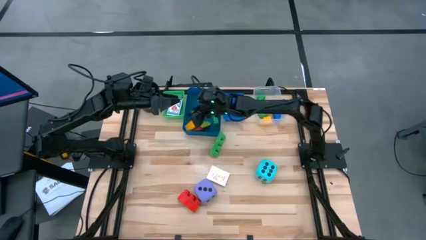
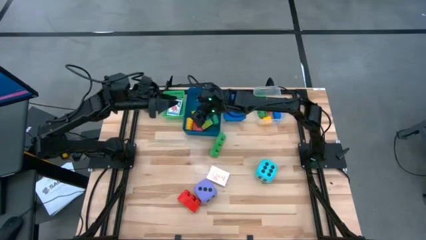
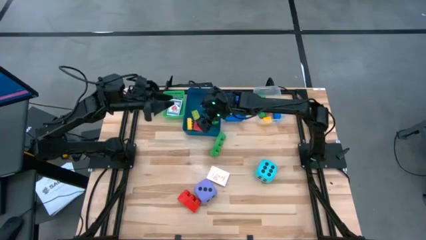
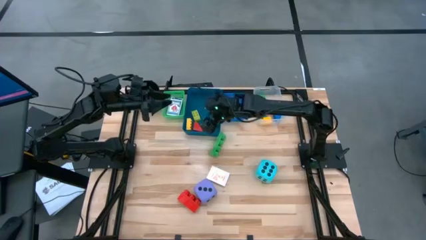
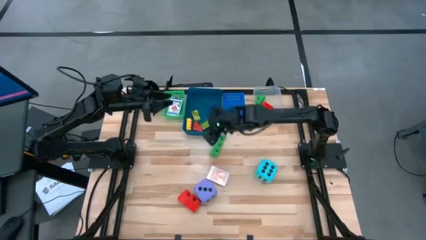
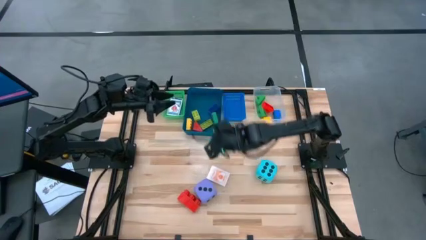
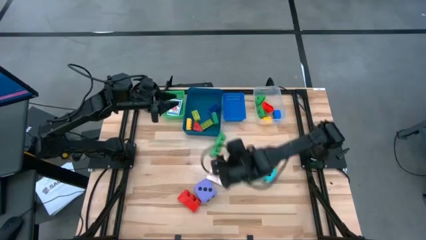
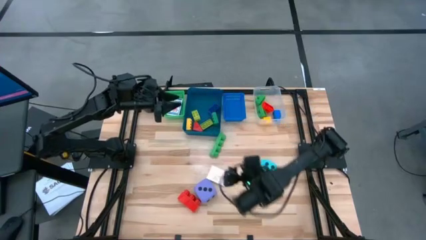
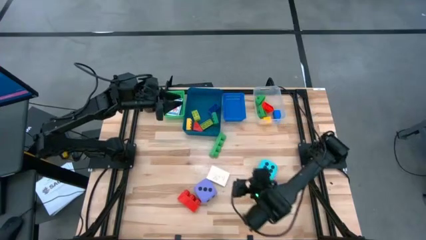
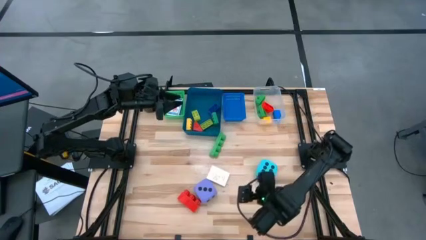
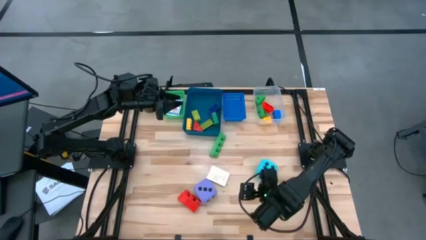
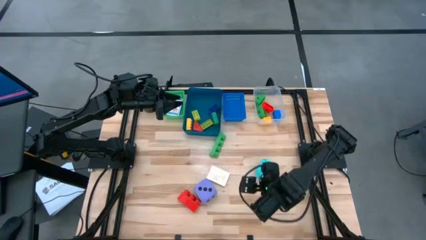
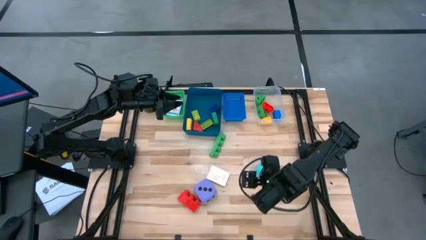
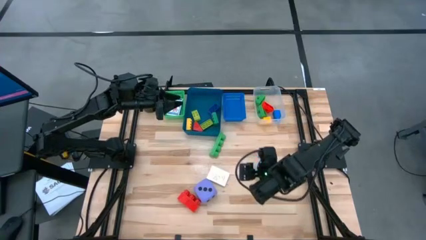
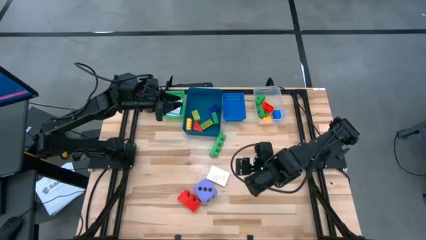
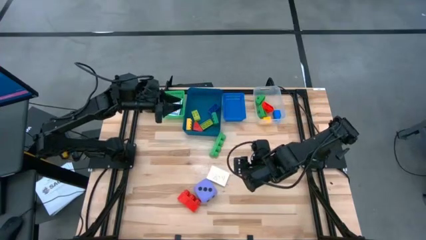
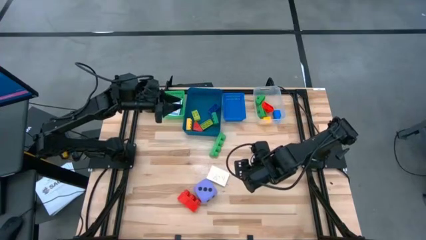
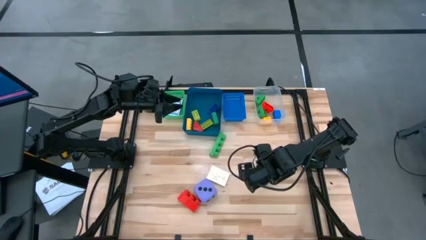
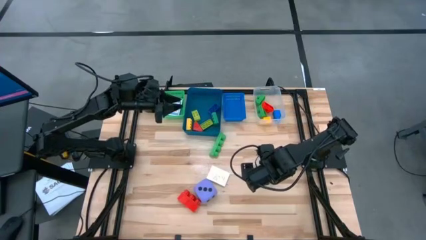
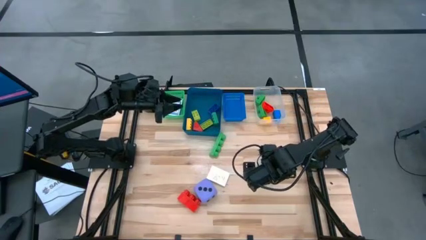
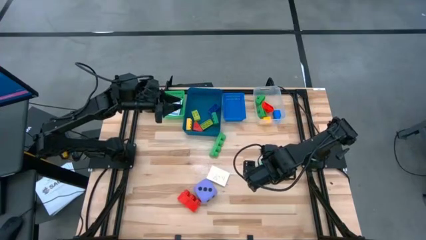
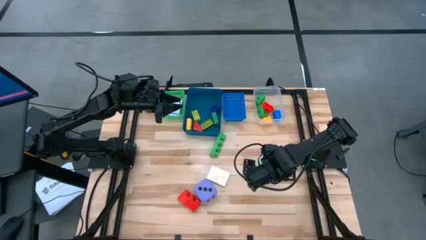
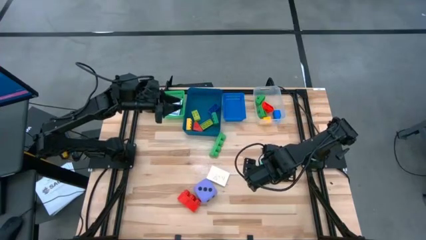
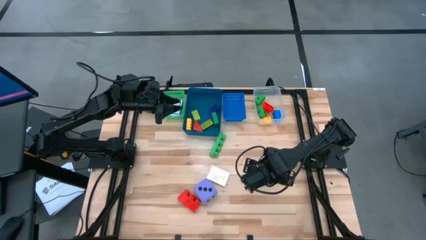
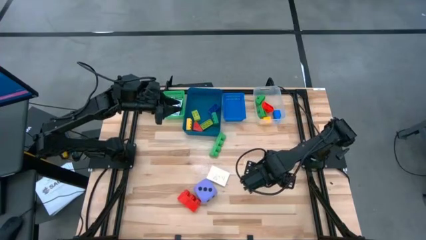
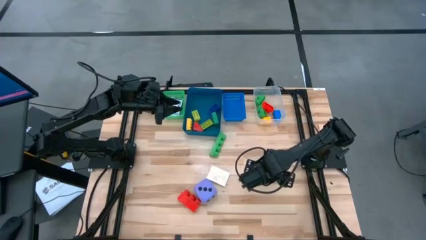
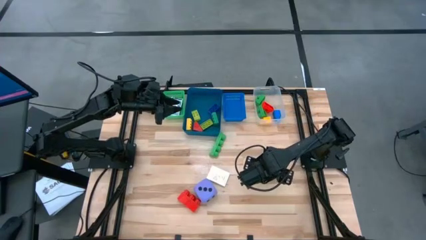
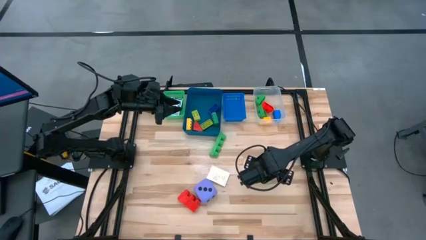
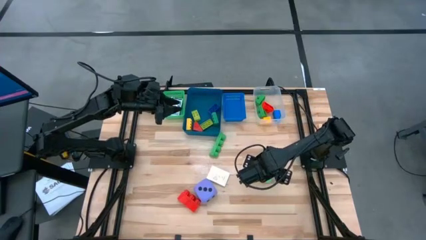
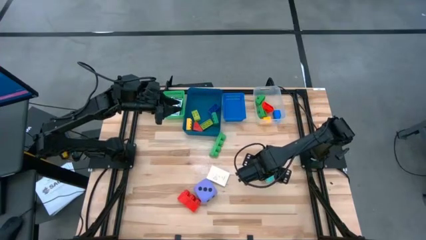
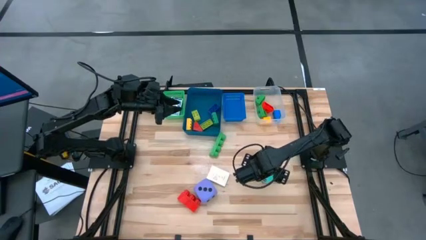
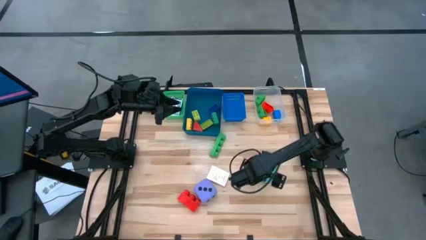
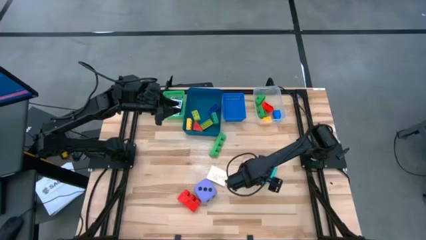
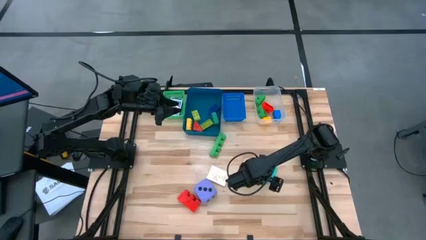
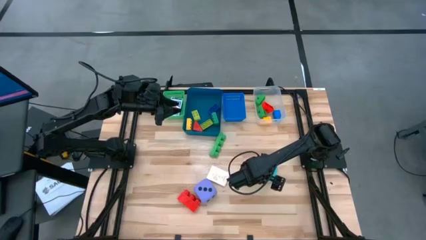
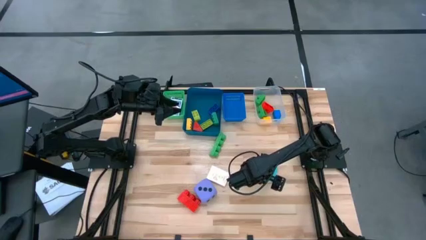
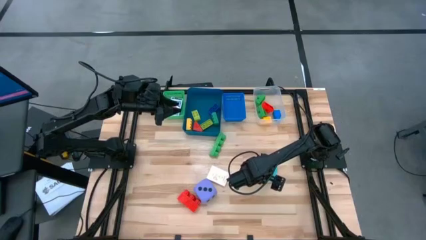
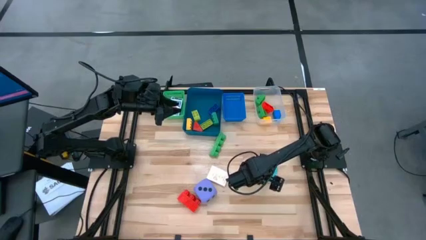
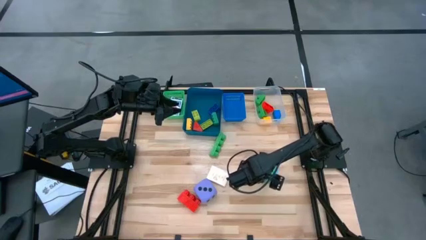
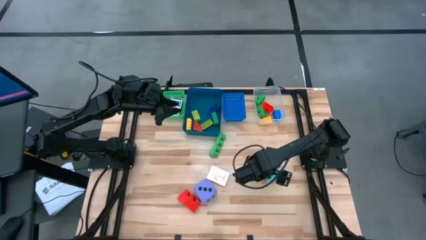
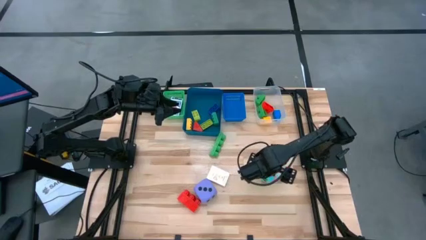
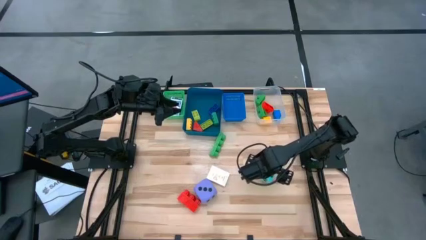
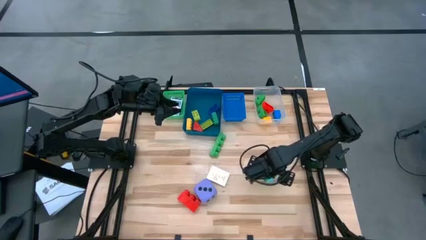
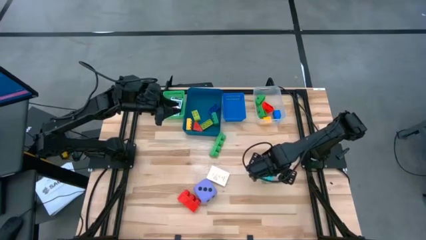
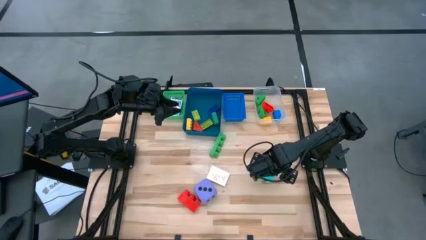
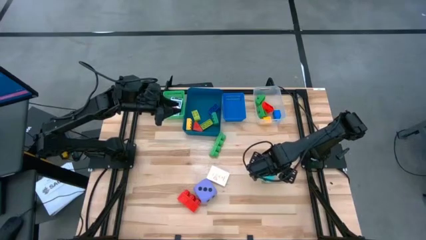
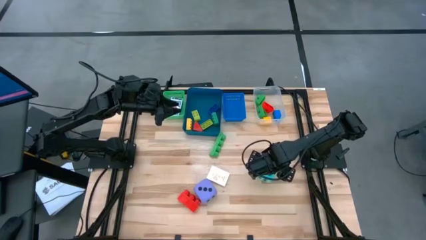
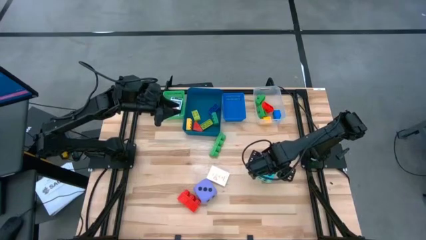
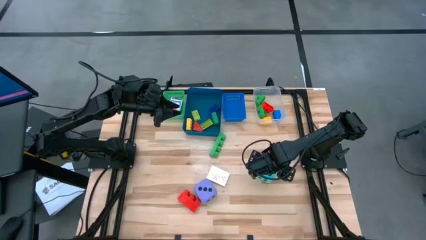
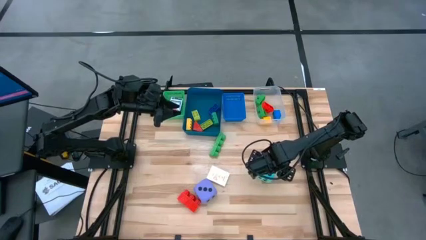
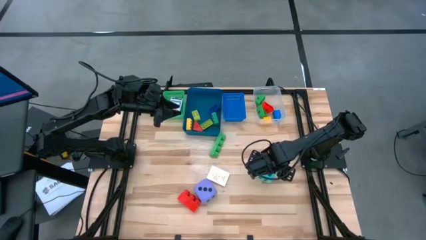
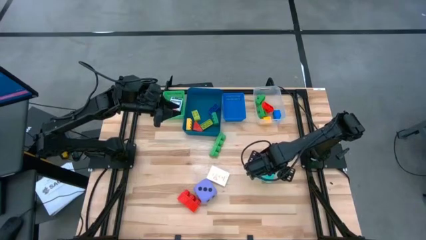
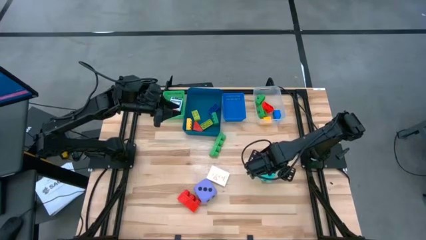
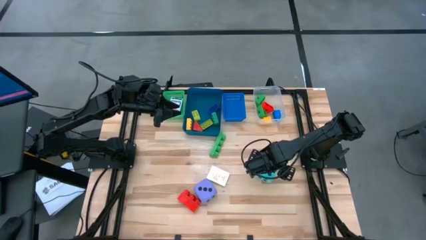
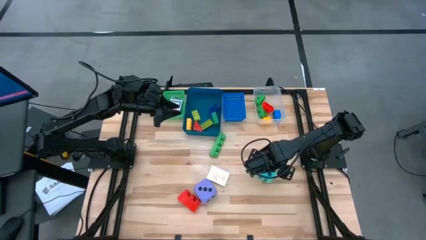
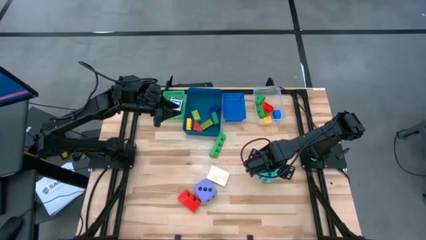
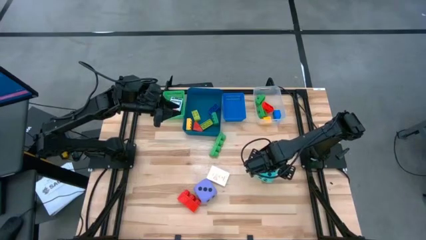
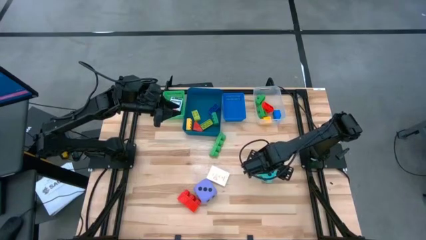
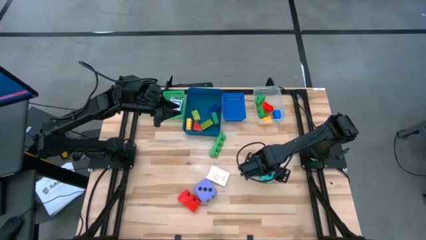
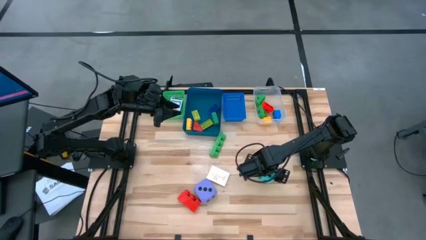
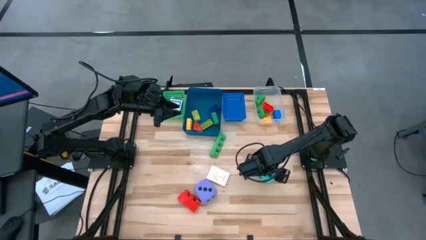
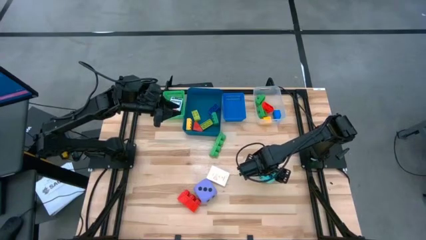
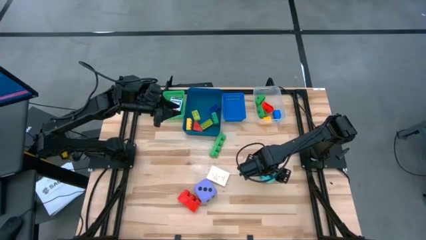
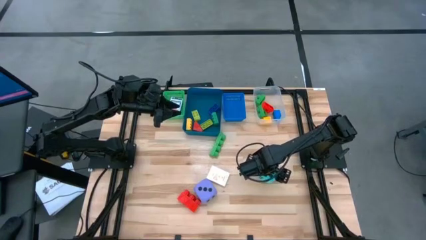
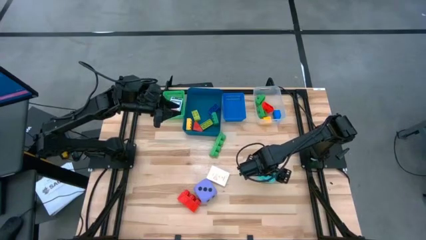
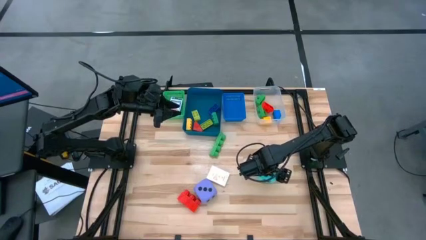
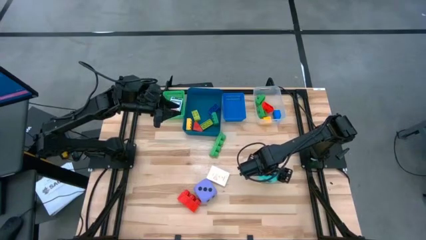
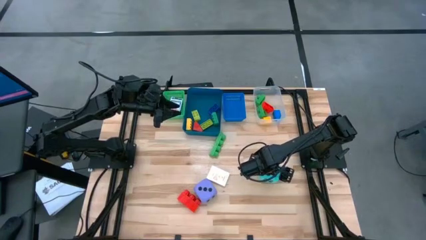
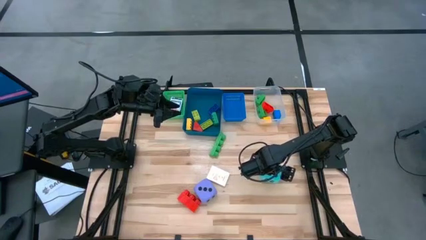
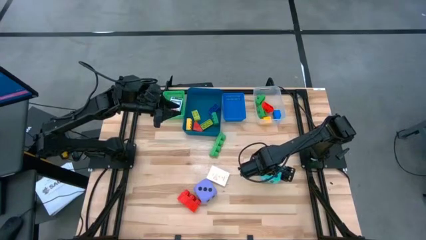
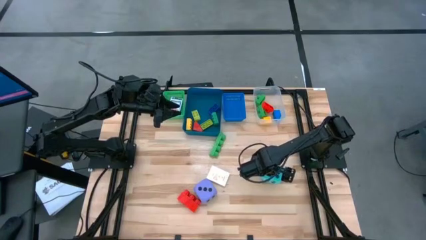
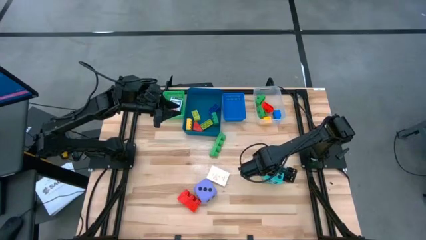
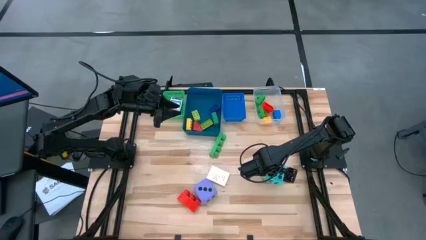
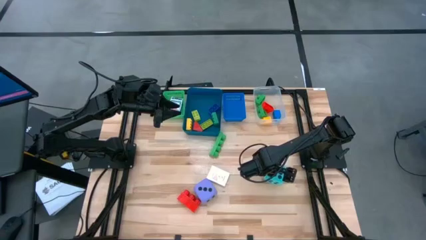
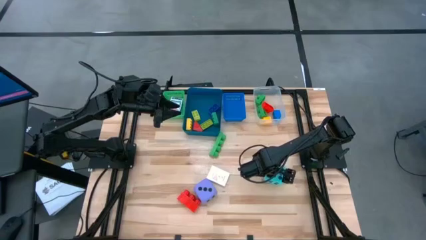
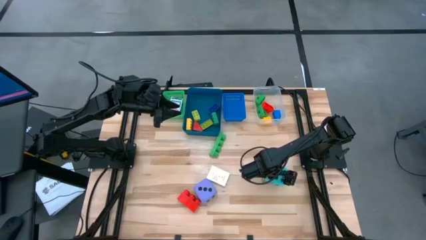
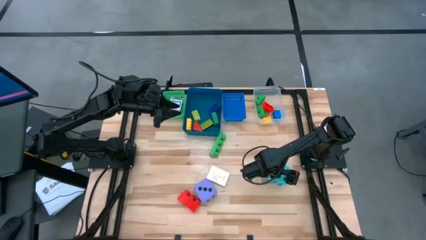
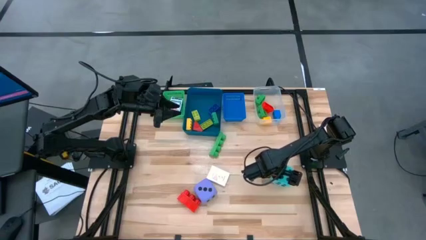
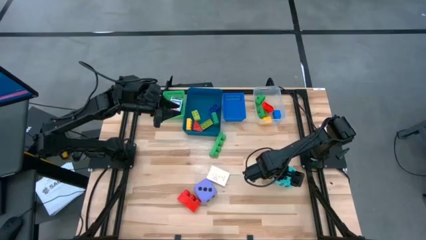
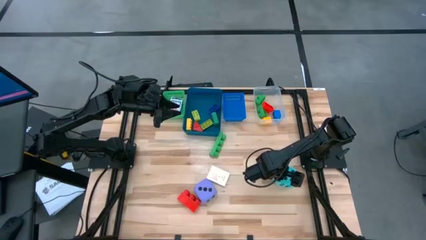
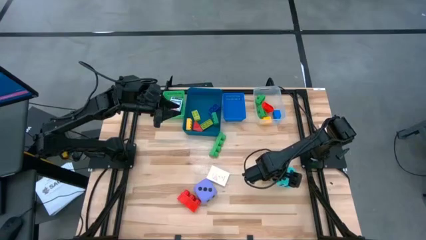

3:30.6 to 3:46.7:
Task: Pick & Place Toys
Put the blue dice into the blue bin
